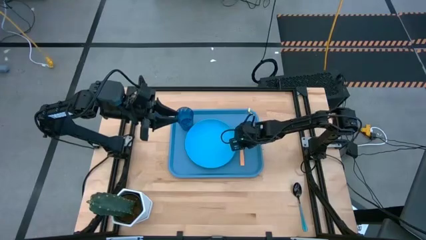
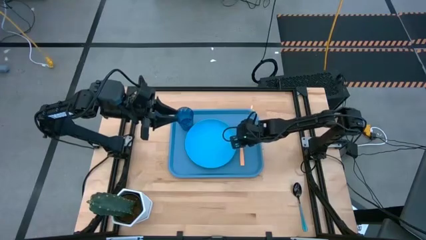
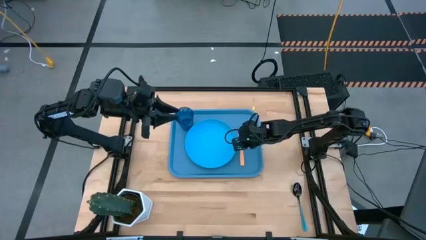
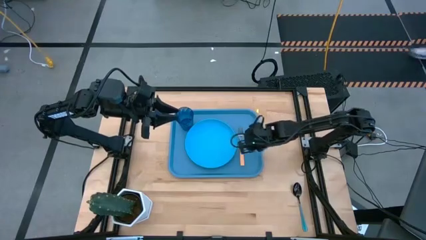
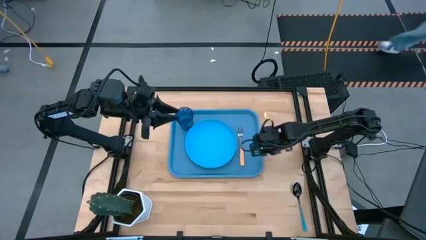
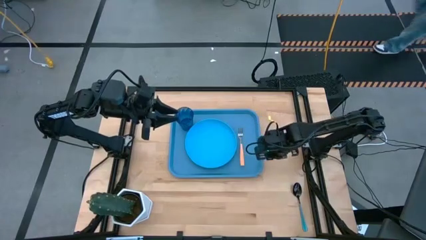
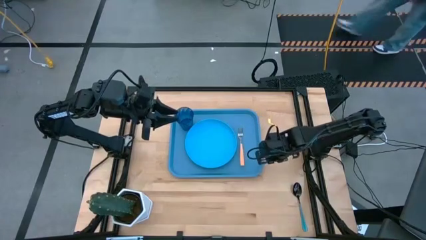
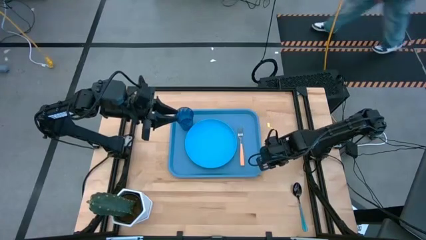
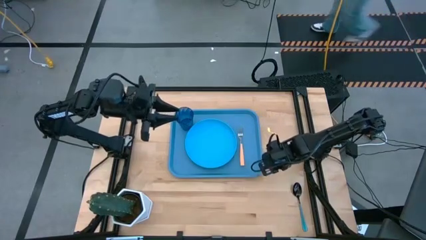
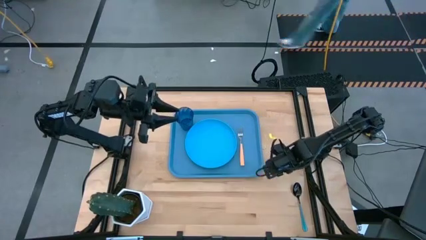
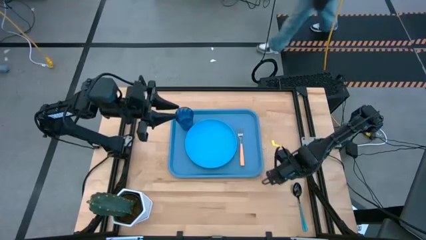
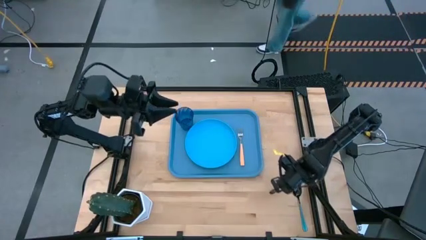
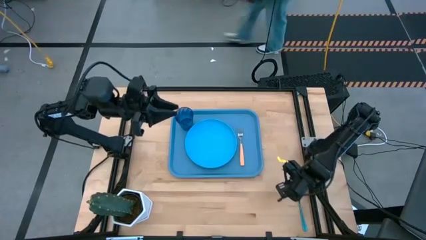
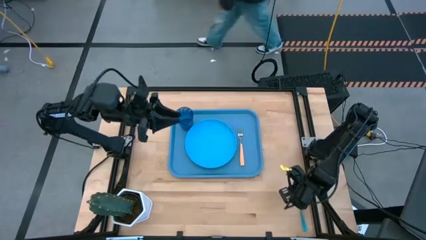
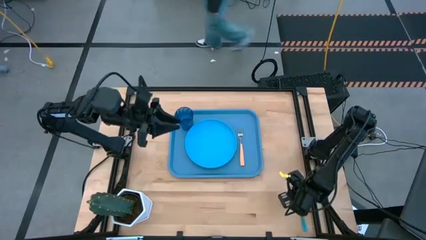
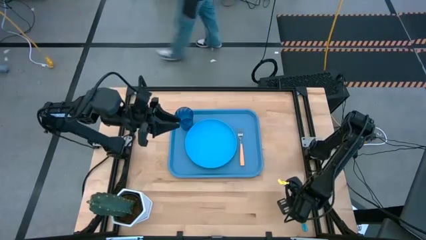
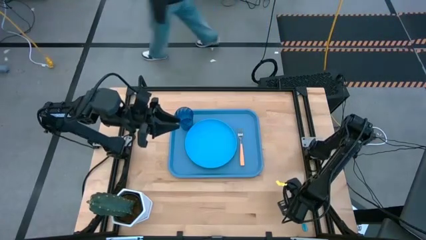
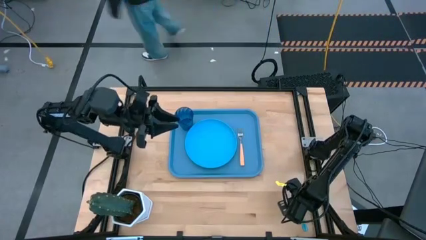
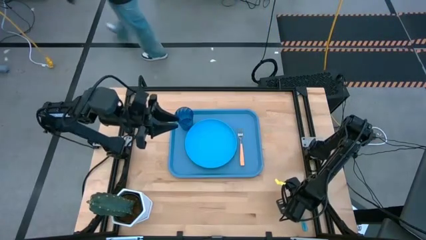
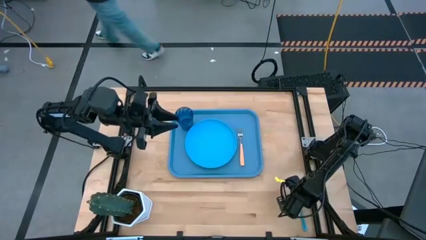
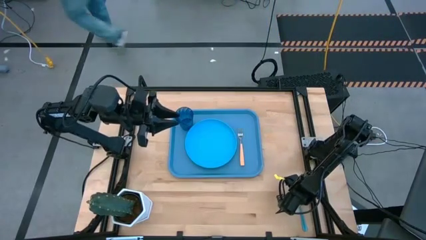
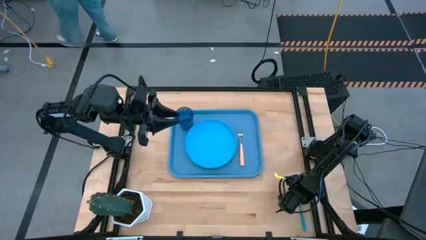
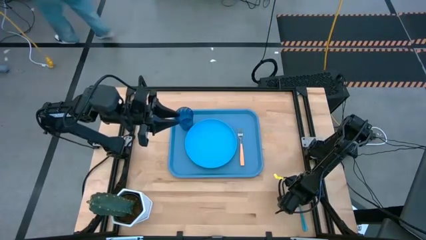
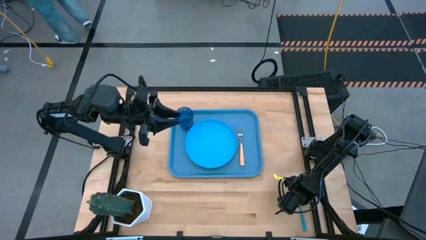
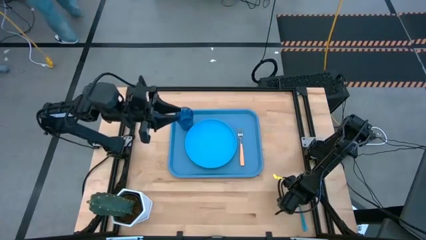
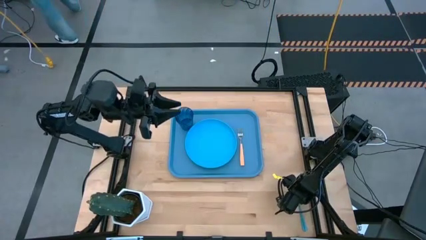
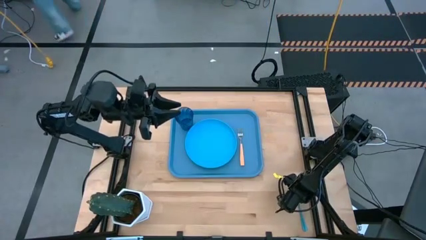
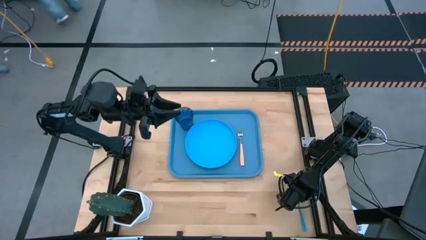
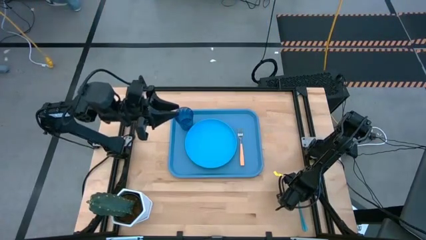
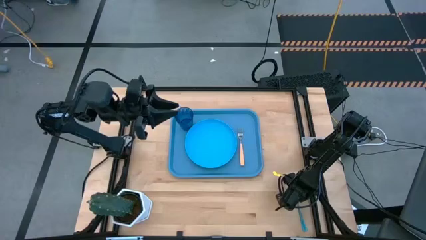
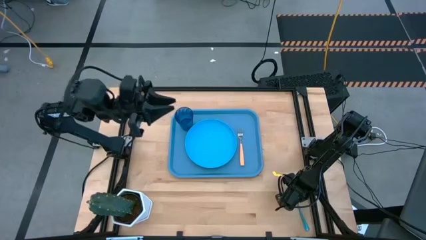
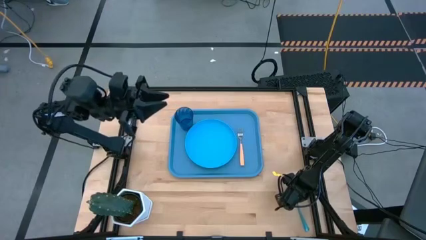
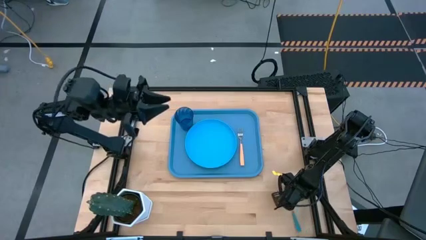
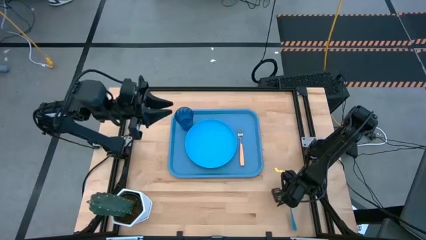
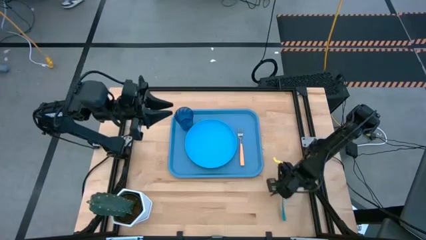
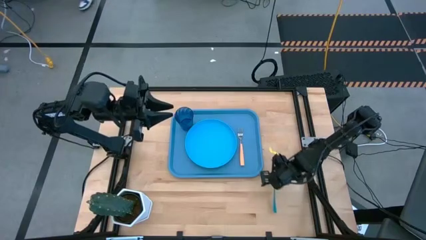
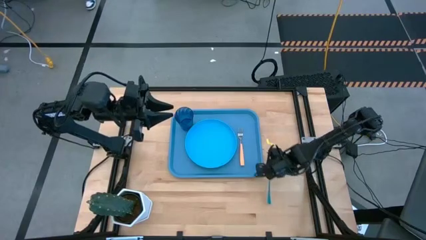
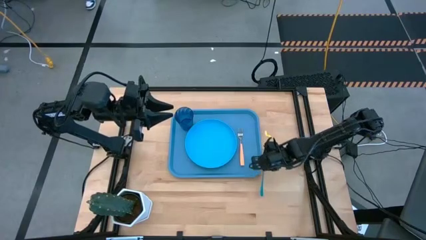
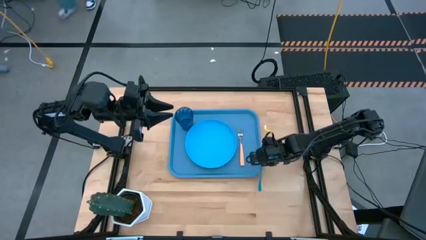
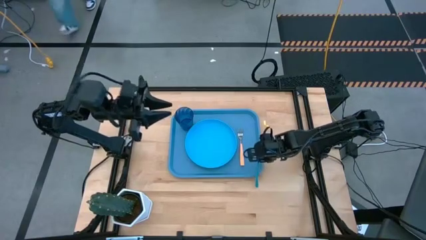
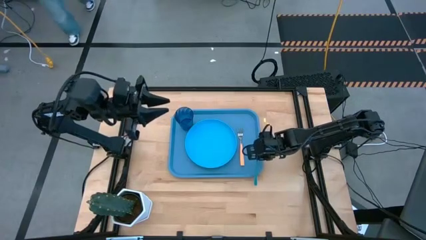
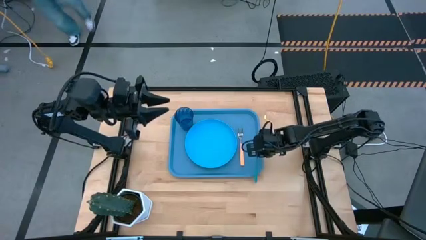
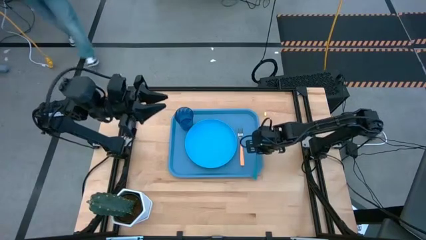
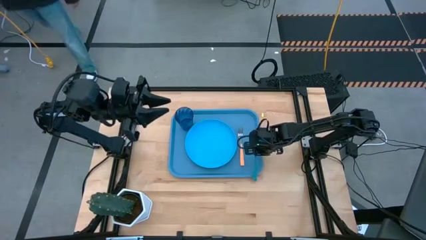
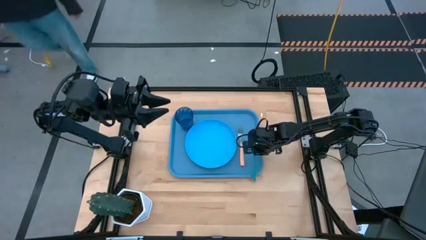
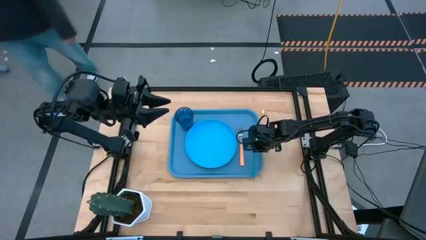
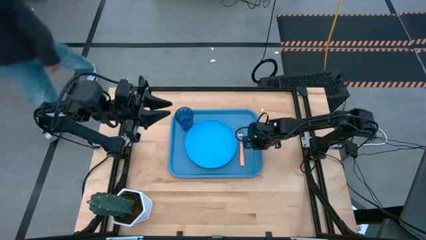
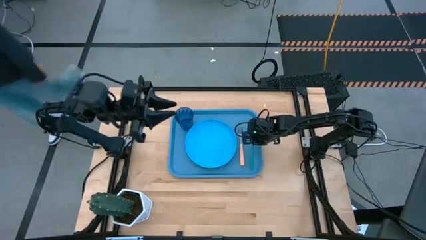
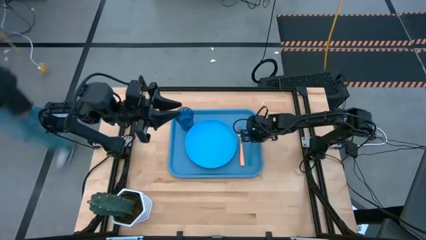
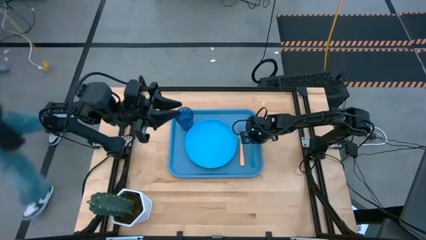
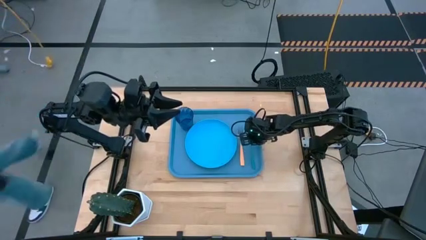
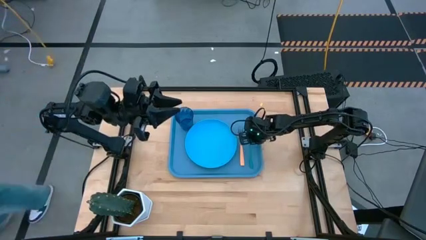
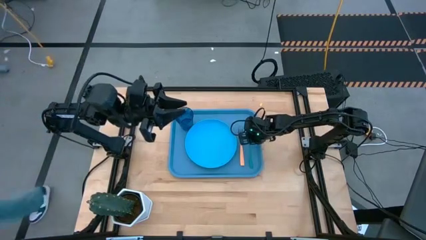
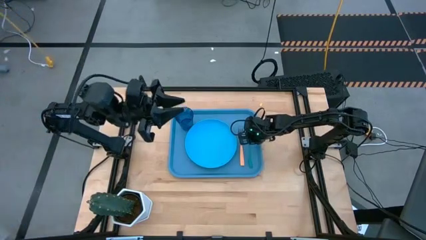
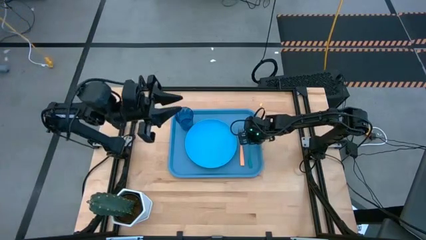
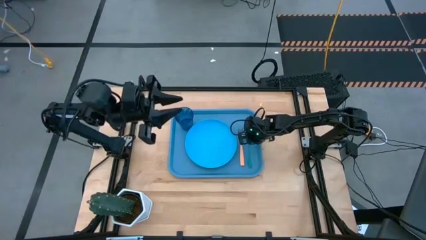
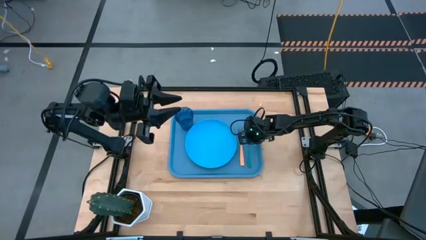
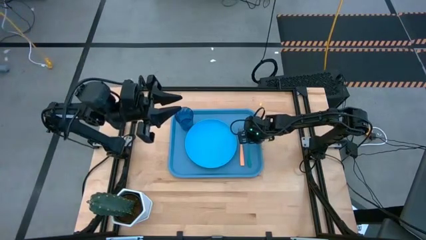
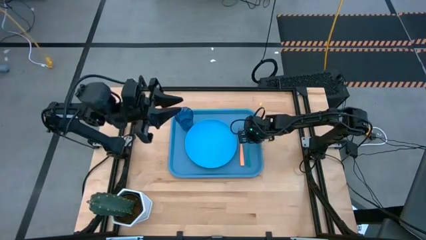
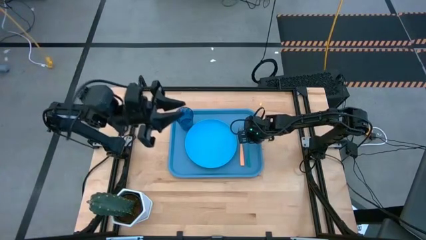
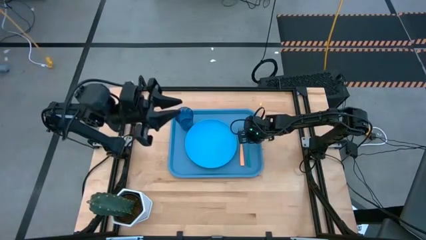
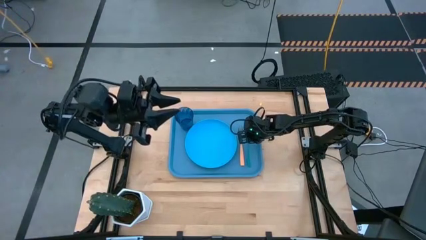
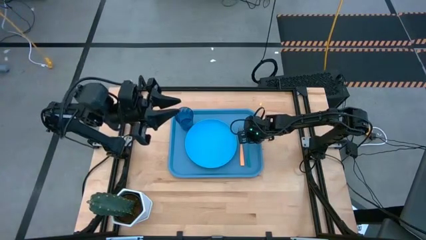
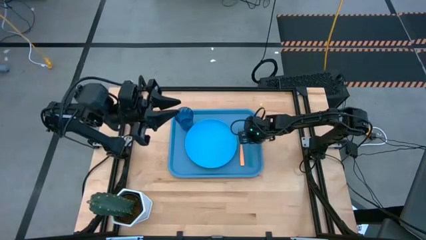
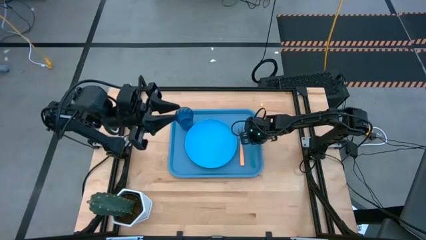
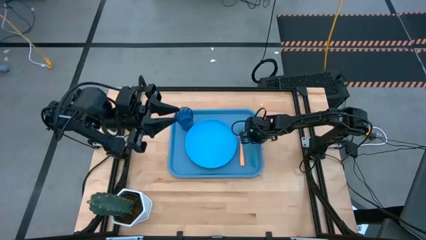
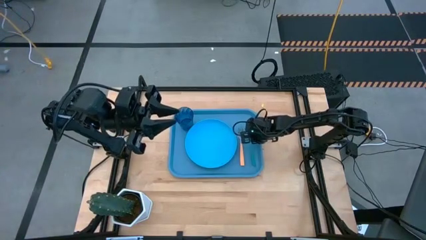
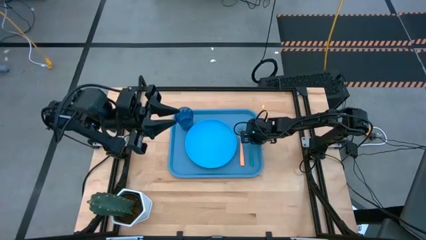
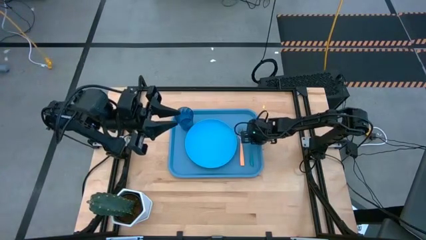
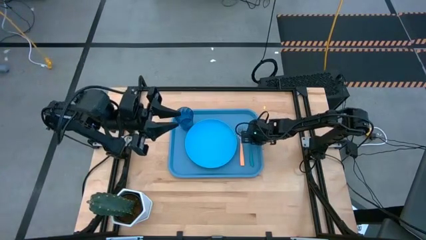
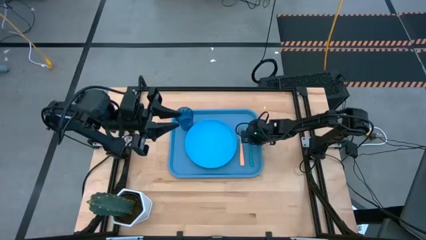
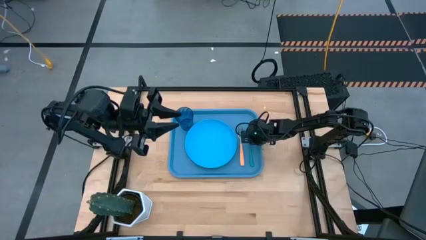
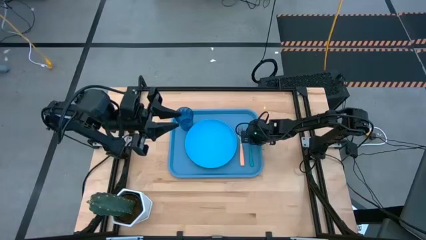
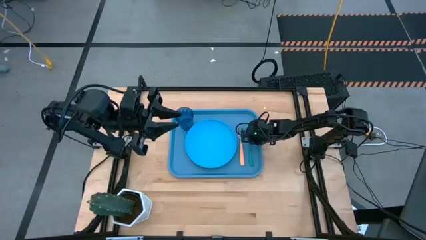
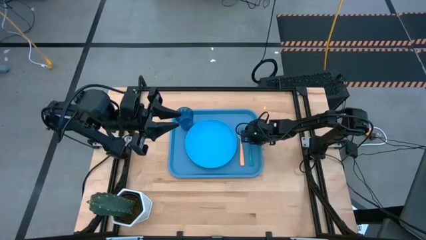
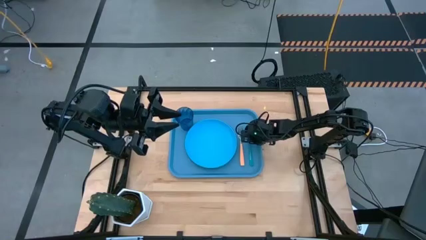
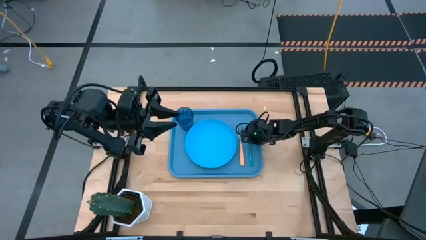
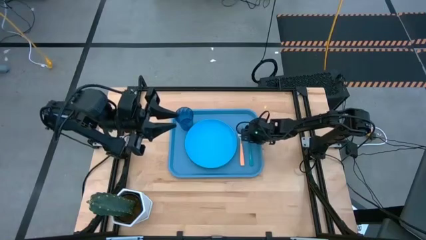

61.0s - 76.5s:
Task: Pick and place plate/cup/fork/spoon on tray
Put the blue spoon on the blue serving tray to the right of the orange fork
